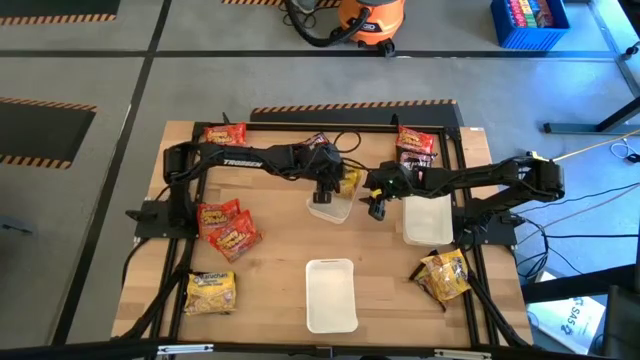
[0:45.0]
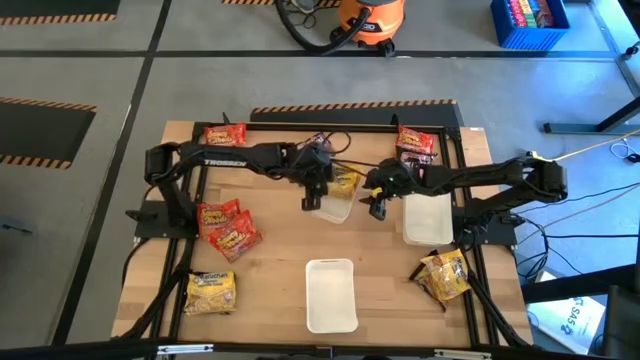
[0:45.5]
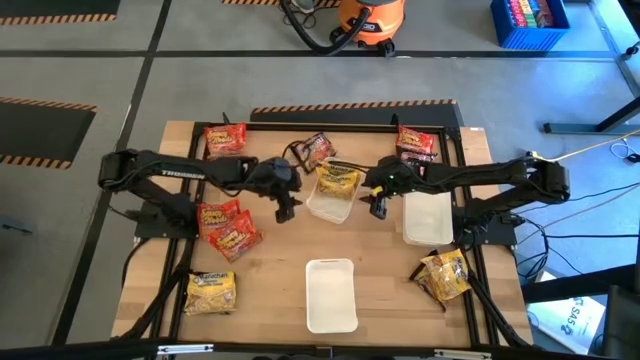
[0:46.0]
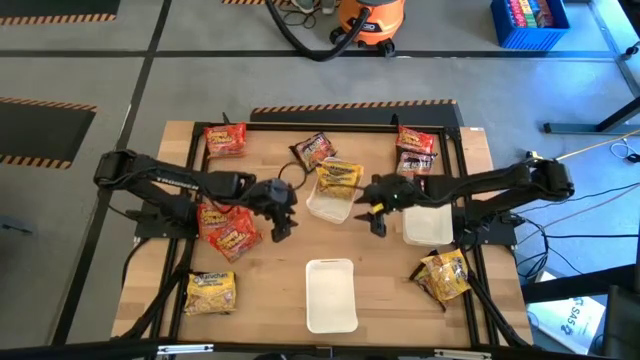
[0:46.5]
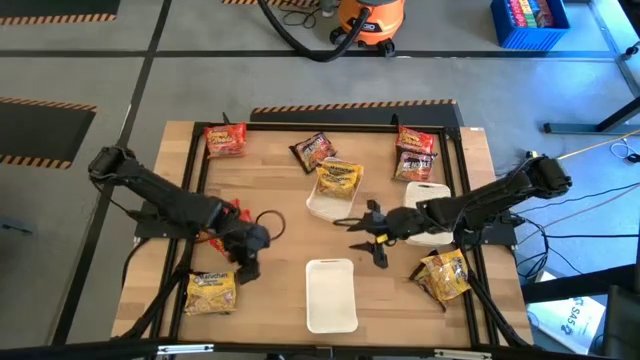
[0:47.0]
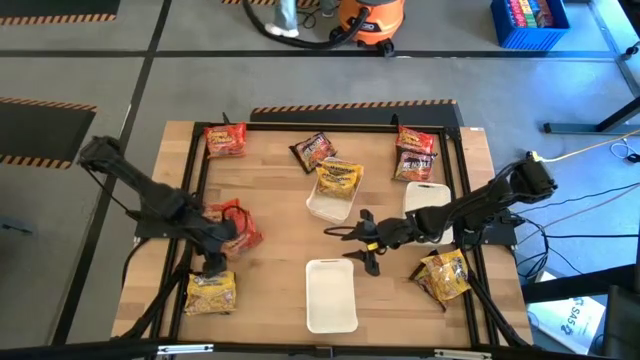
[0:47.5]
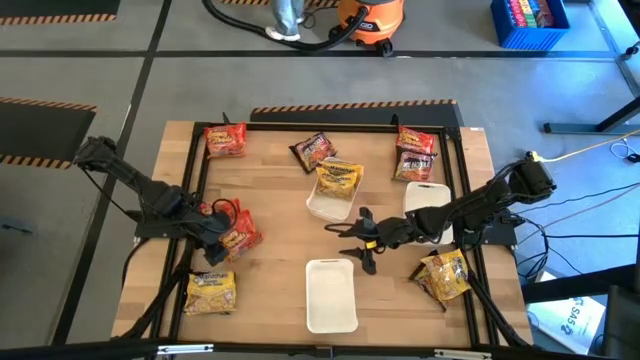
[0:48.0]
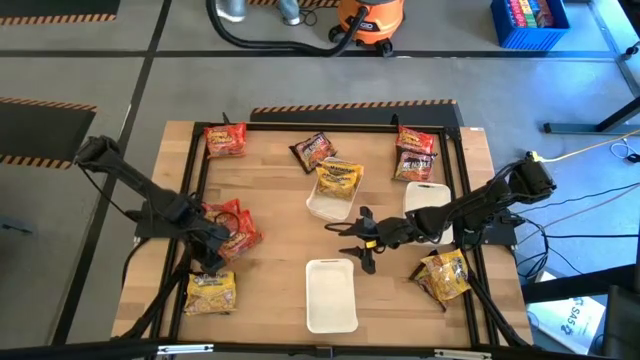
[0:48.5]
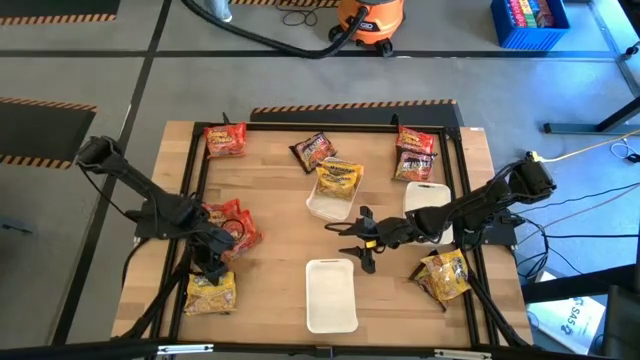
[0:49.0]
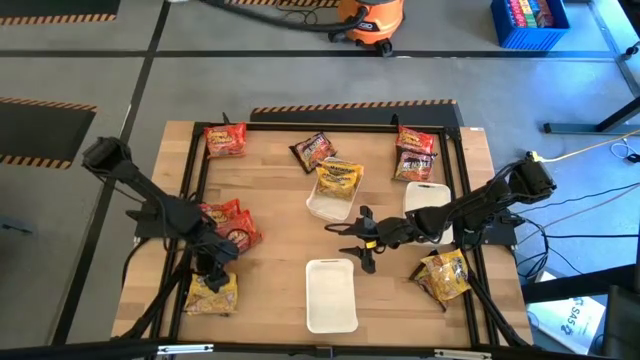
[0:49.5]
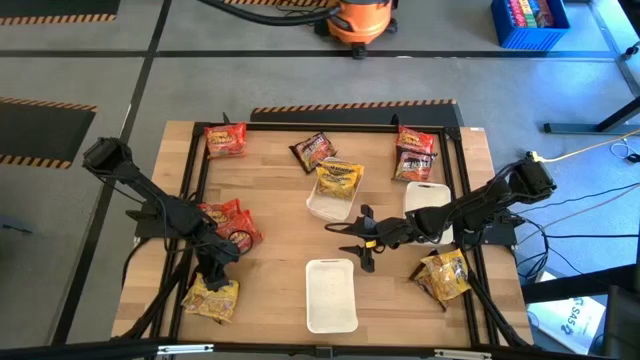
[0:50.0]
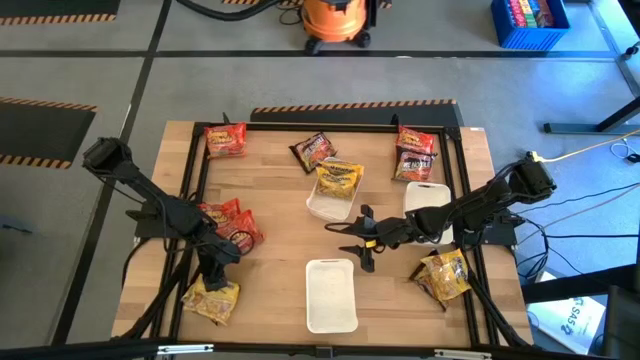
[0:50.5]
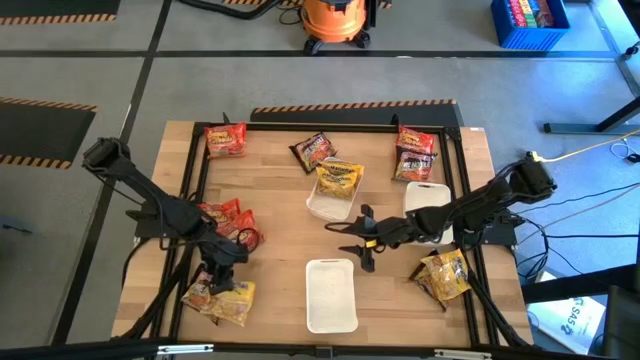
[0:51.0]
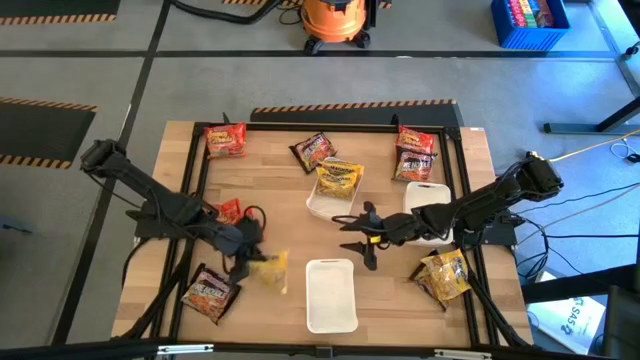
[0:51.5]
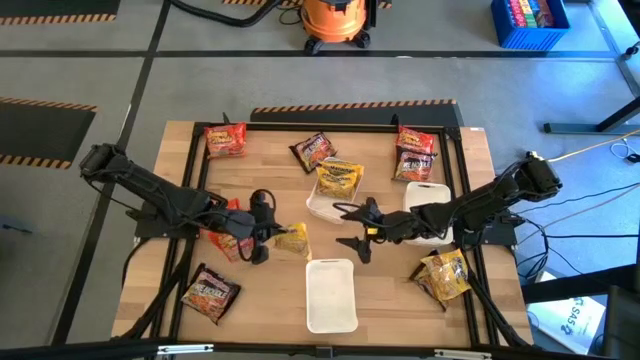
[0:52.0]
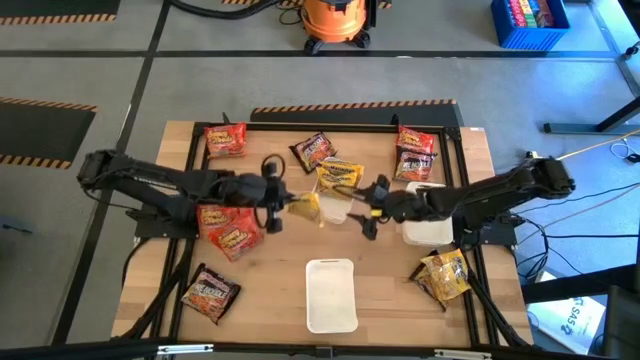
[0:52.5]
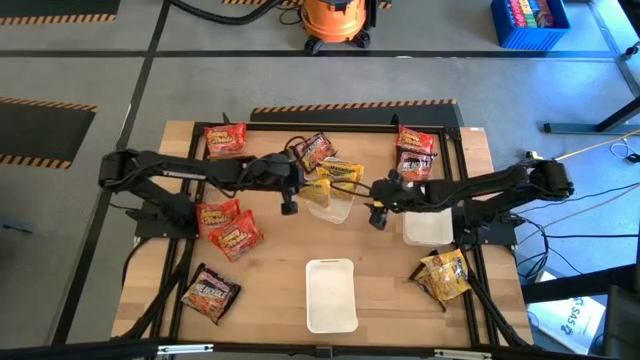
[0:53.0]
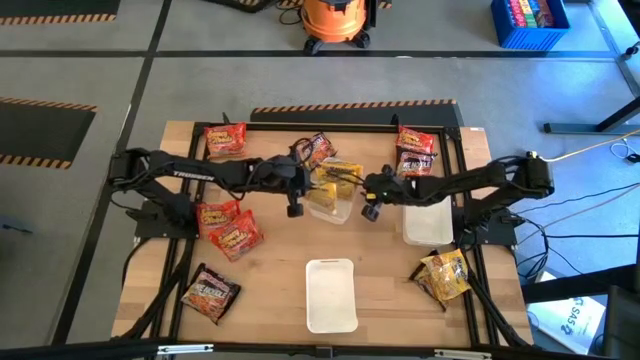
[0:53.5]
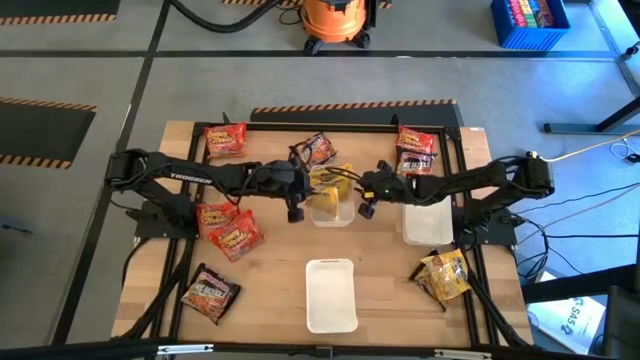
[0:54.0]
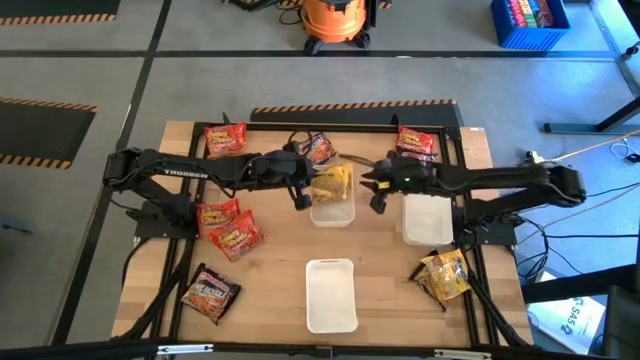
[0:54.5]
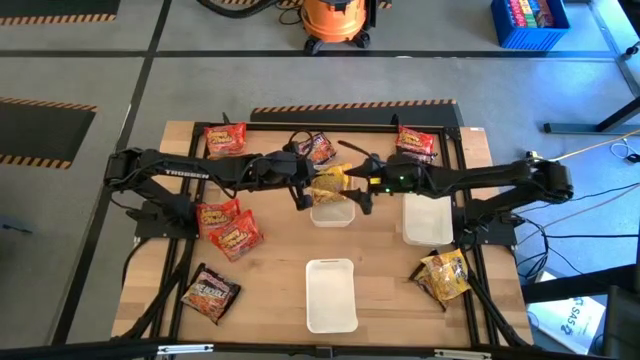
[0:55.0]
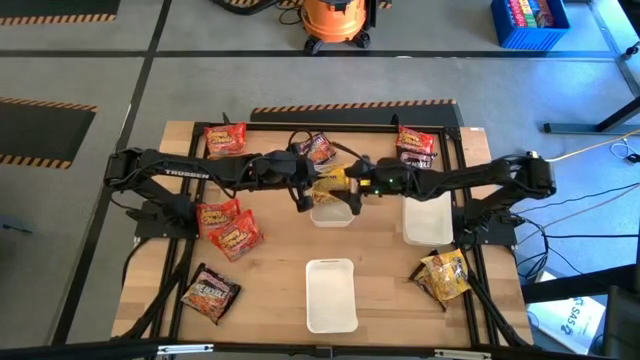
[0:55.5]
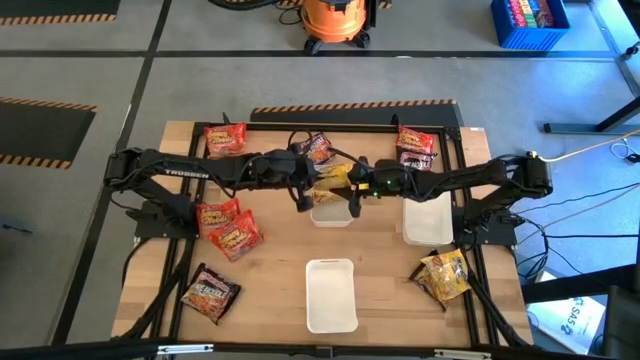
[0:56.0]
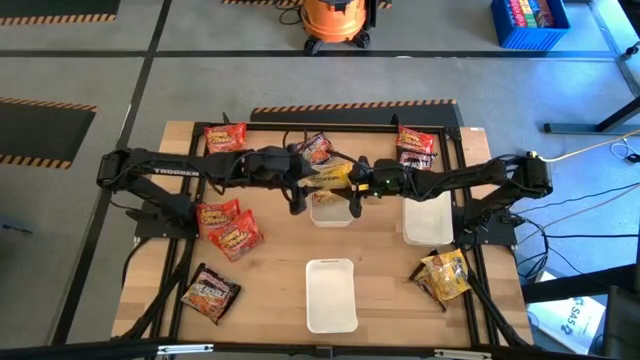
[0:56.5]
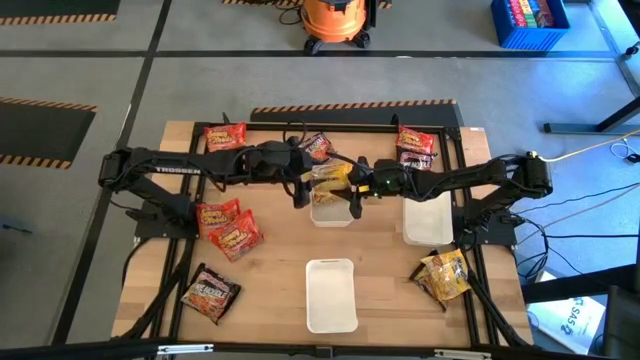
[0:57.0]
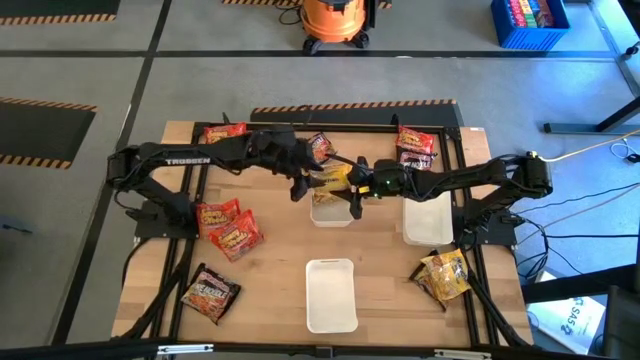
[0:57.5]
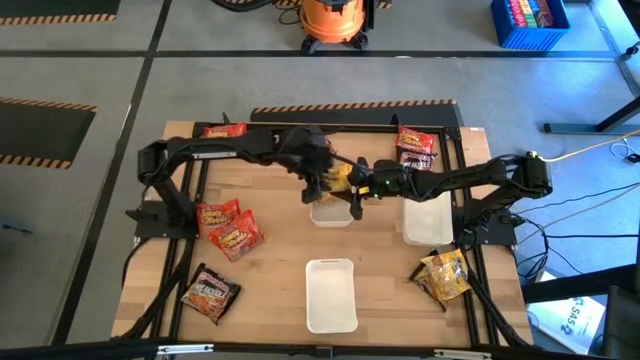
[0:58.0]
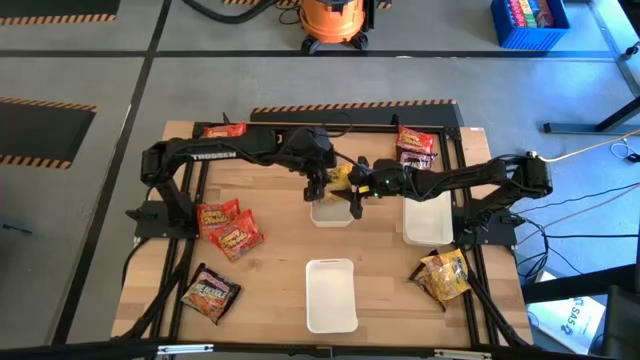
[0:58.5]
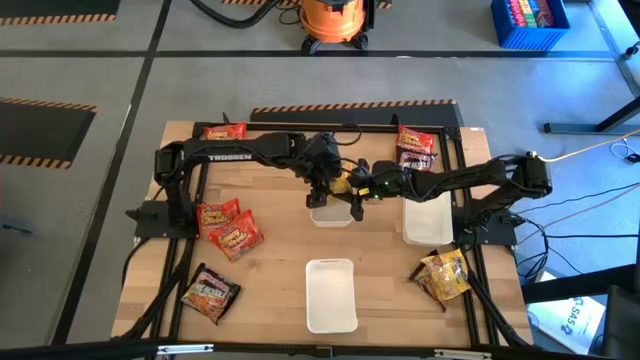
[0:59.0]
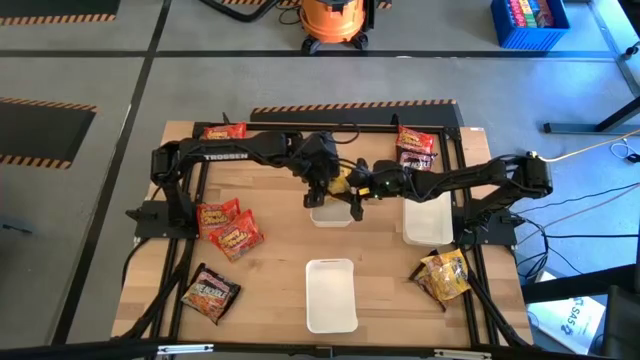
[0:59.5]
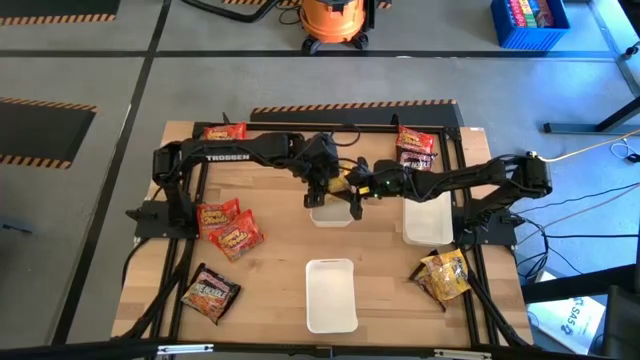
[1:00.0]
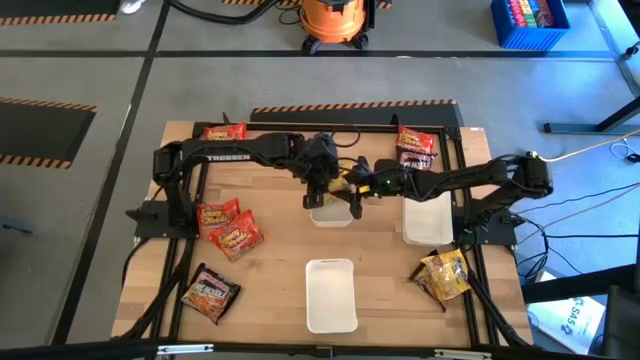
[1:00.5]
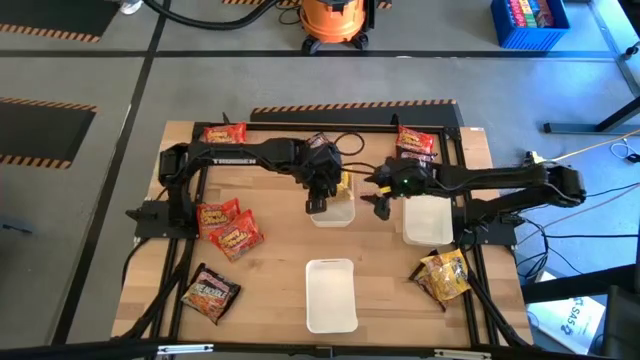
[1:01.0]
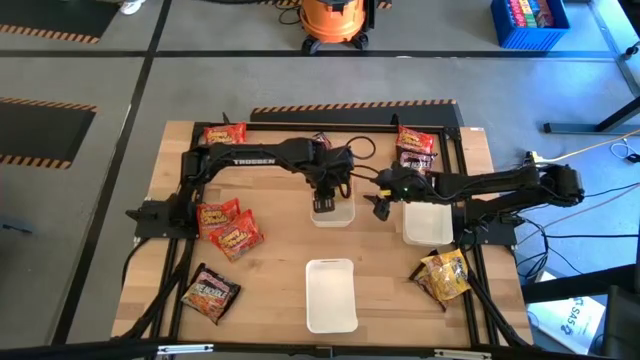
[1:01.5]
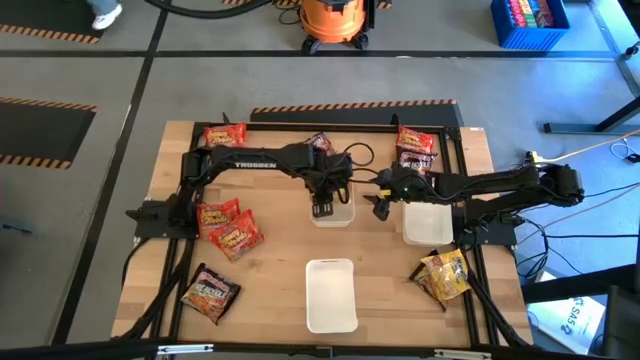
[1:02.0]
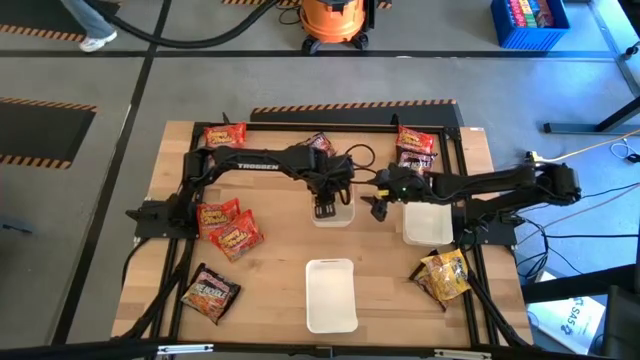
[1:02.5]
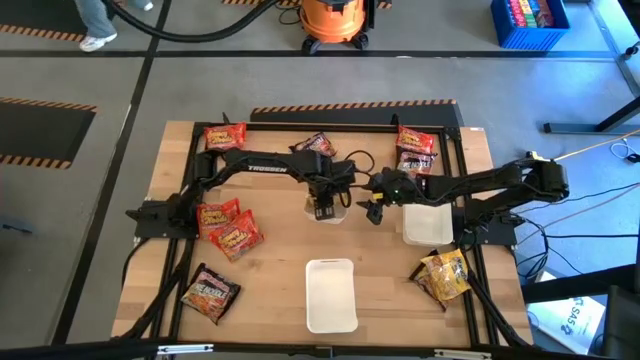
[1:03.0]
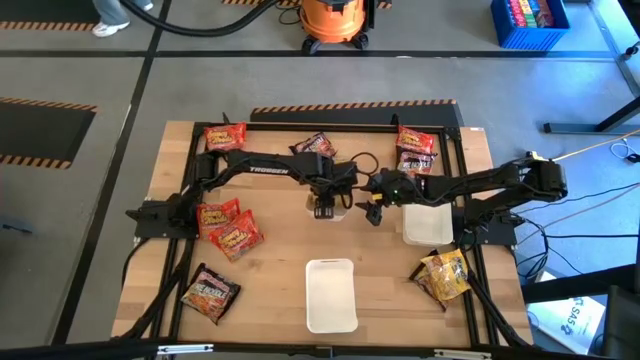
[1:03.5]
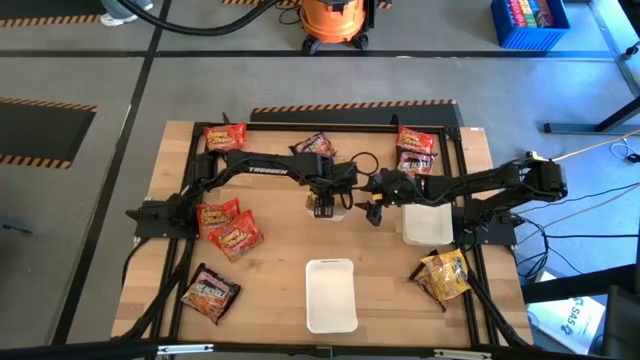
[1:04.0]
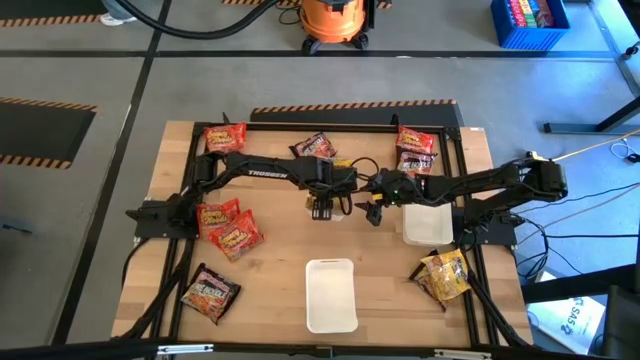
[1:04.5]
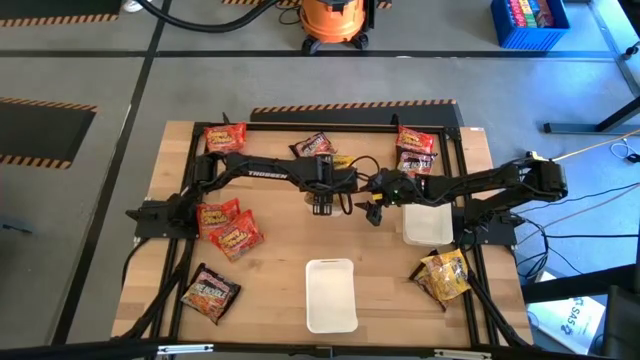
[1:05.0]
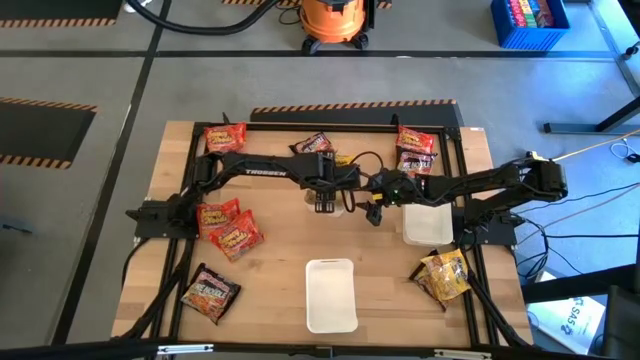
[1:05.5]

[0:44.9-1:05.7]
Task: Sort Maruchan noodles
Put the left yellow noodle pack in the top left white bin
